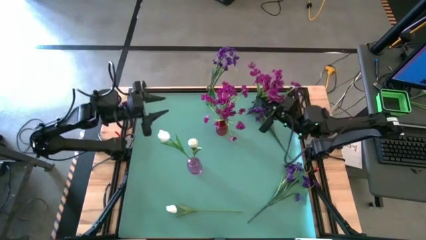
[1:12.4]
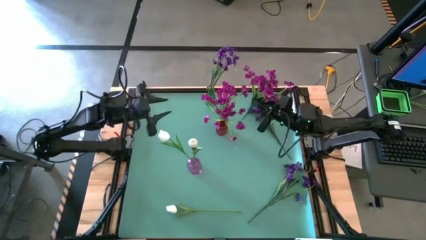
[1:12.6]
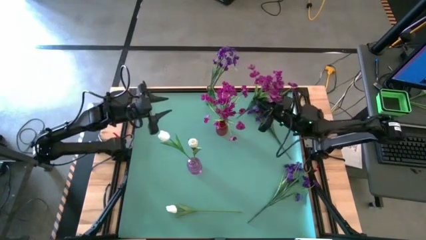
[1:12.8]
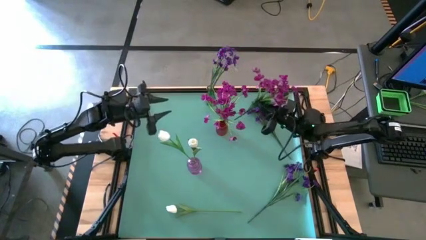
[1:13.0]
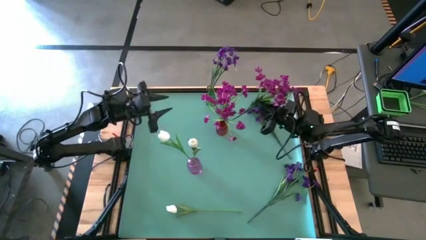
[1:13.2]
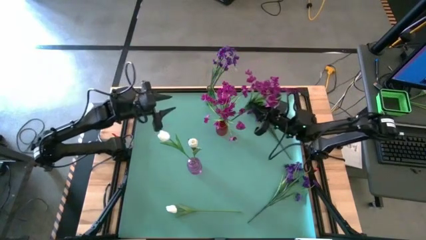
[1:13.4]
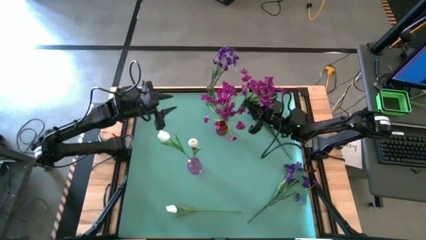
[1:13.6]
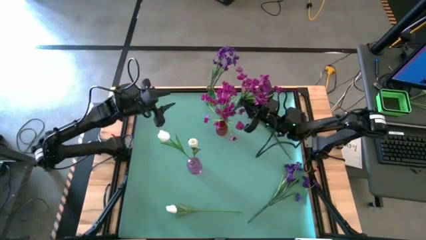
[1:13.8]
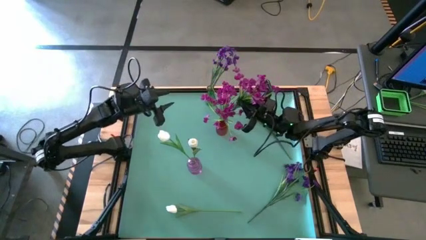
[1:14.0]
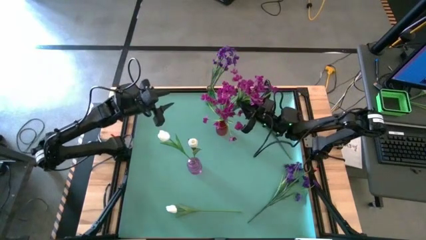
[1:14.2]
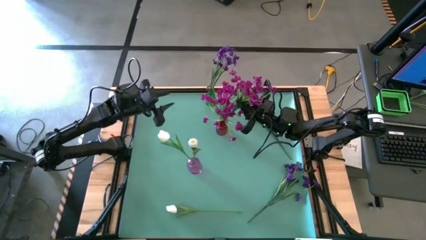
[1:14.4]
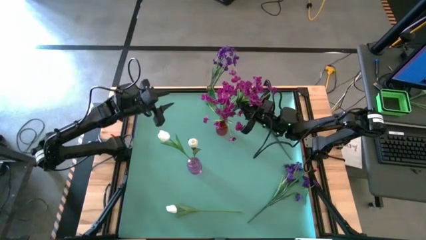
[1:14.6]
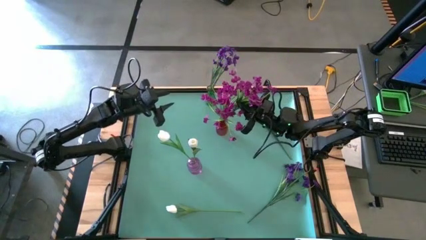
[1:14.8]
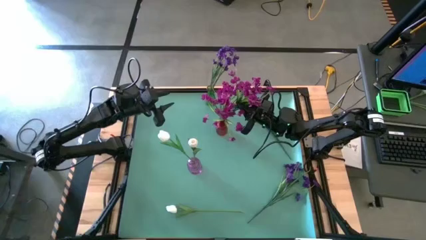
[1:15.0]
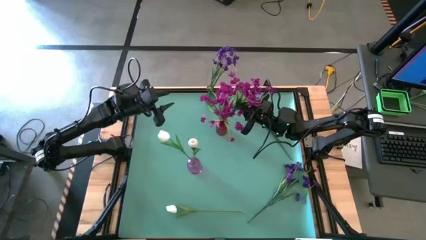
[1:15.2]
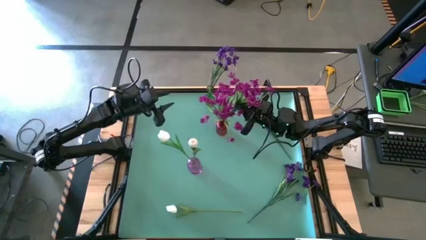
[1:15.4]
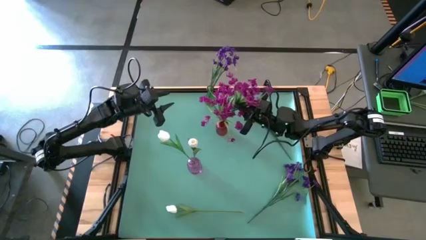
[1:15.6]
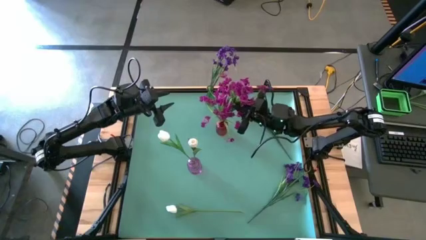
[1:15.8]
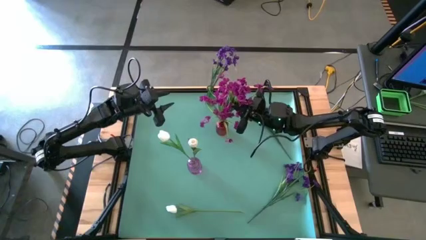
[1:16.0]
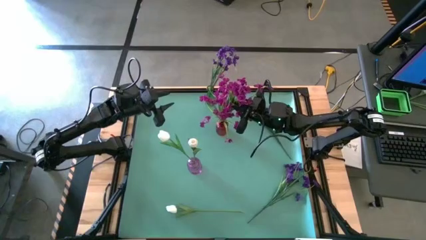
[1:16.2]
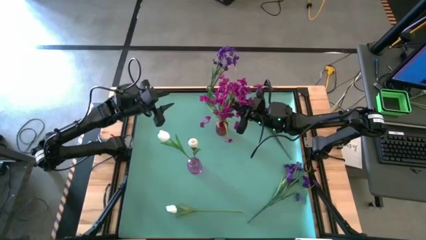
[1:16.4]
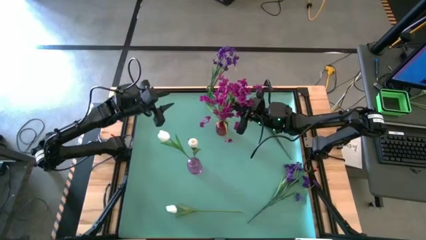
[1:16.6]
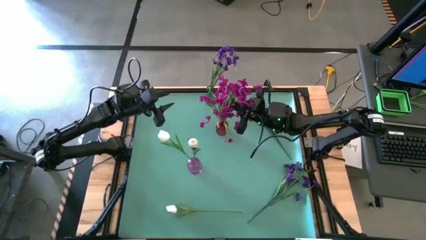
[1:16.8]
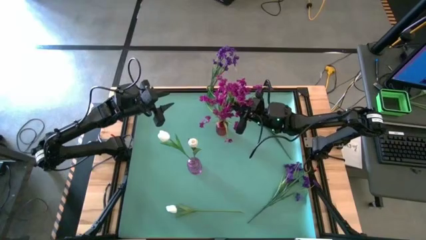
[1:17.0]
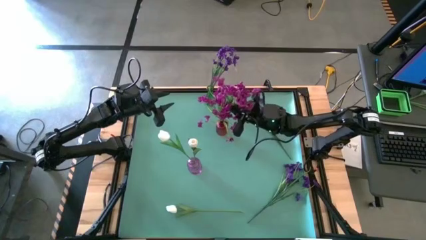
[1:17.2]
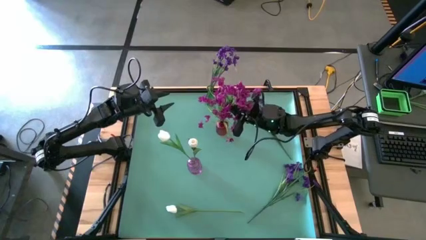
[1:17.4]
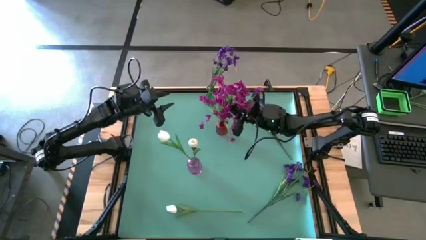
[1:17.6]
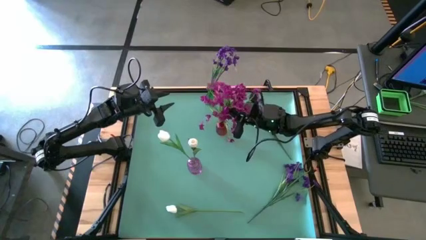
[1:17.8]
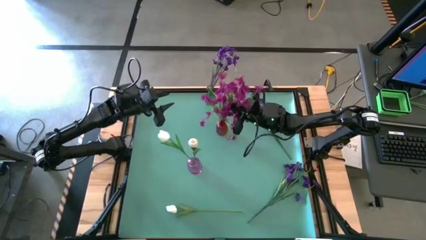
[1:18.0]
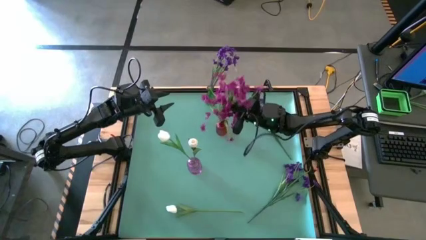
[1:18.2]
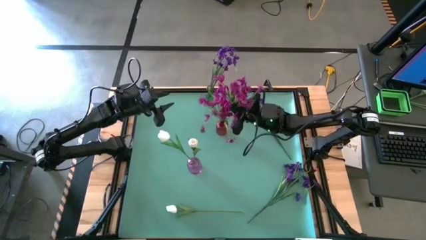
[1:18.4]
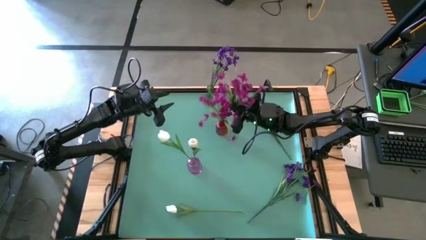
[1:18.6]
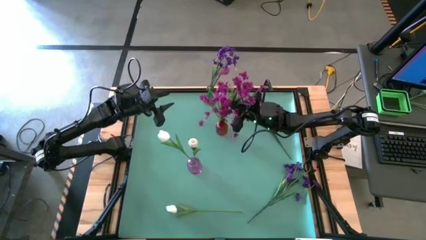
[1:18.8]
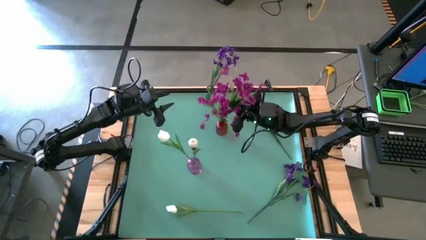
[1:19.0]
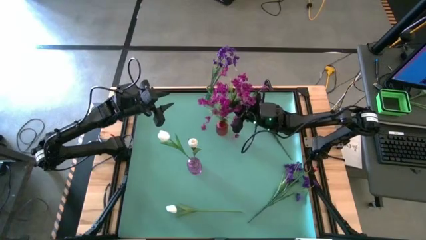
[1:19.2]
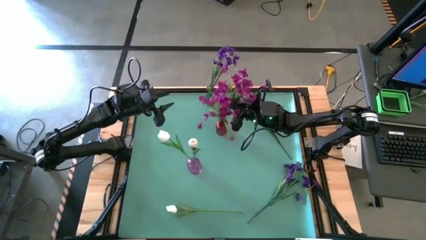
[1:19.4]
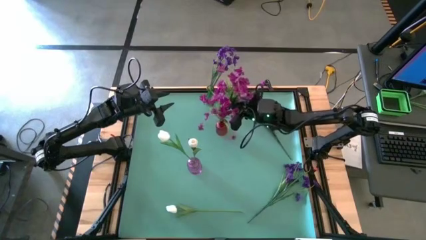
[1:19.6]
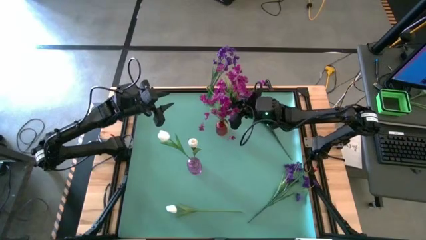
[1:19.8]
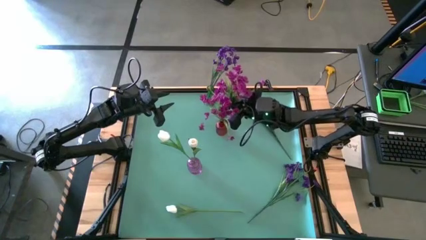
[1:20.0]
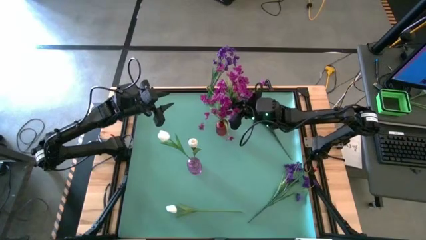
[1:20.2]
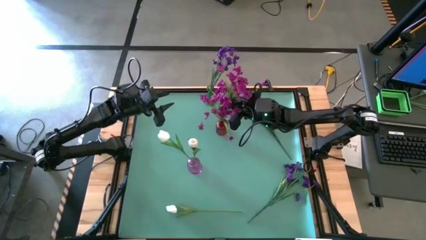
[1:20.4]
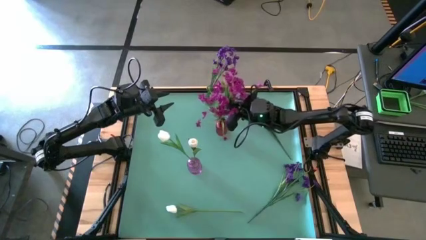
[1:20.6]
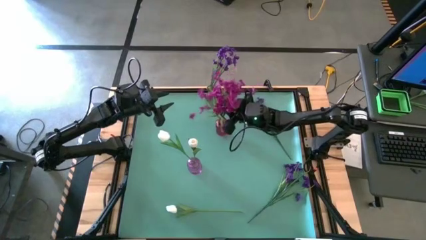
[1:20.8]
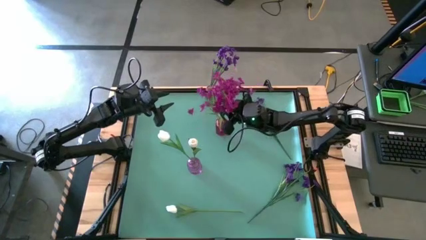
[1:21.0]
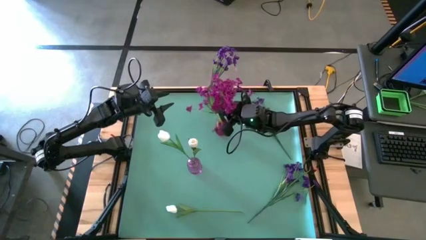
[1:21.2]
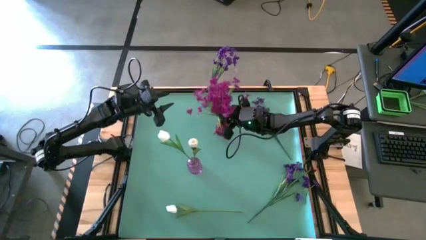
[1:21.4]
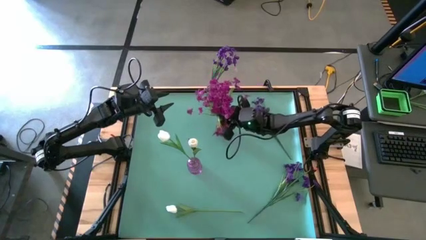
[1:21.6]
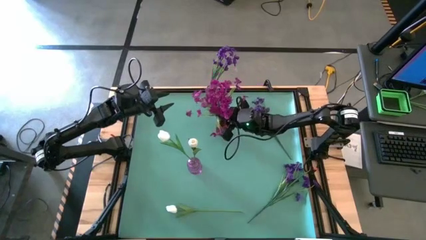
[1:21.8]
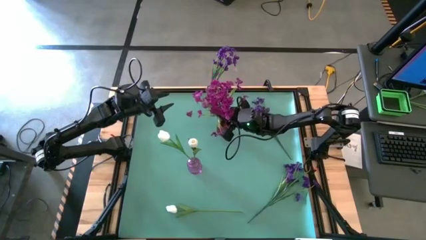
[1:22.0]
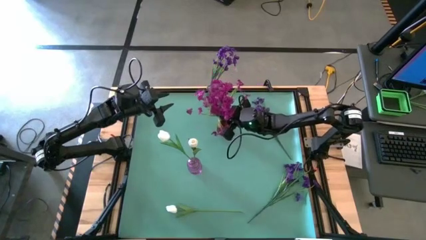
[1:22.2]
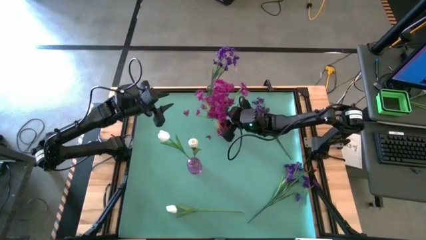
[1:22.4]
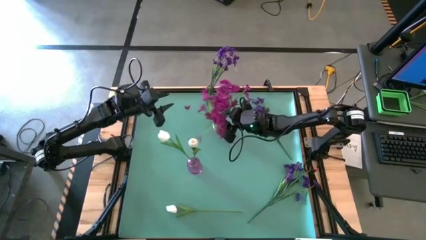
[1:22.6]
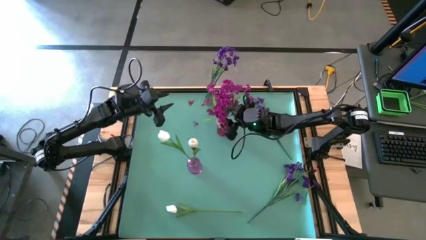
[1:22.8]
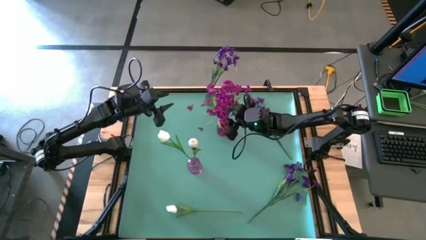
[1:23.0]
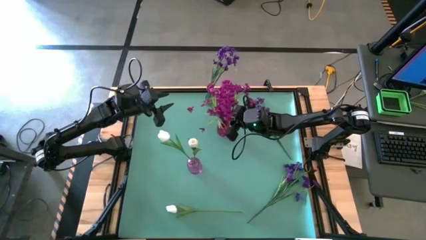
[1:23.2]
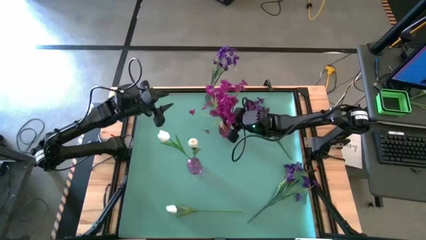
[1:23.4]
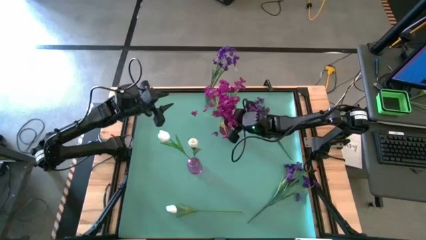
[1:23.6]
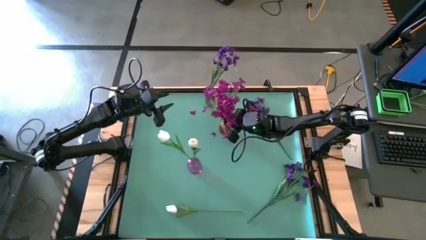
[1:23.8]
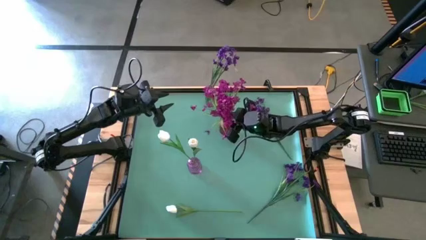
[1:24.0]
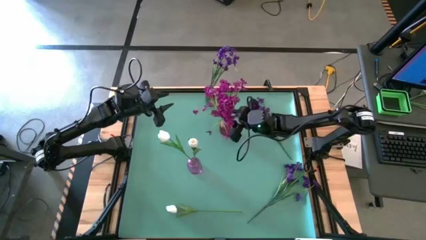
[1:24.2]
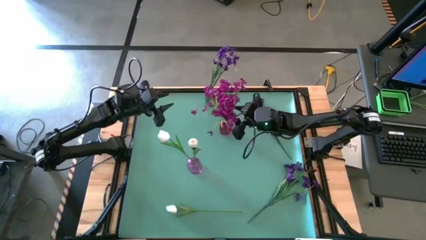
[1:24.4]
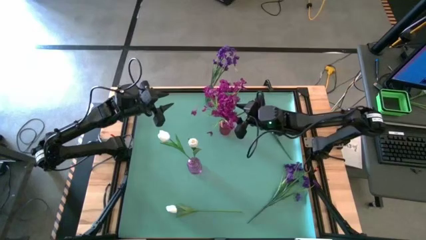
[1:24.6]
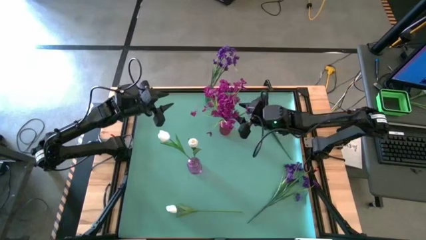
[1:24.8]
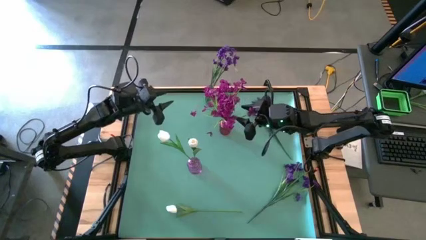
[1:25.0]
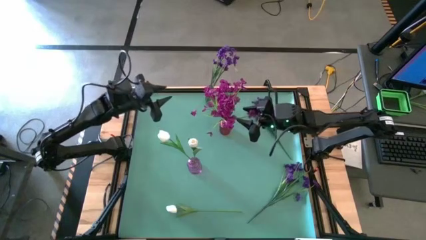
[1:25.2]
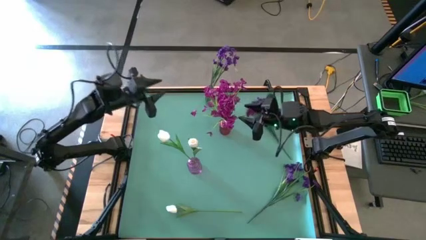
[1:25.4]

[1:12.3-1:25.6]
Task: Sort flowers into vase by color
Put the pink flower into the red vase
